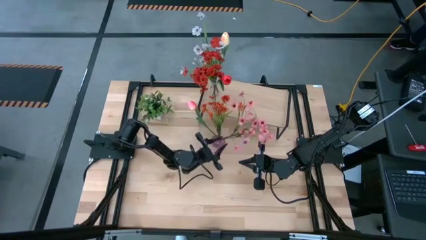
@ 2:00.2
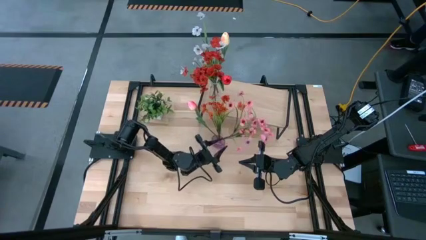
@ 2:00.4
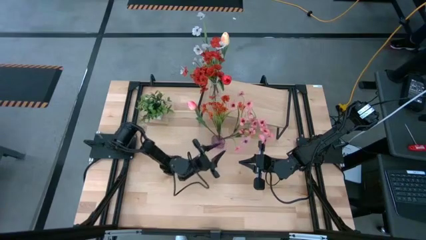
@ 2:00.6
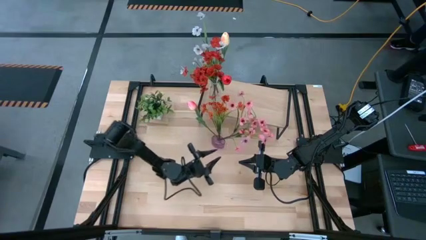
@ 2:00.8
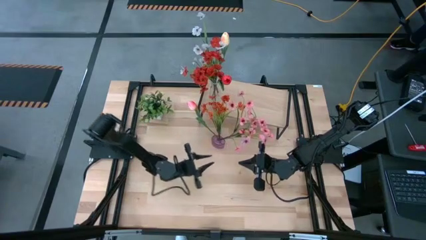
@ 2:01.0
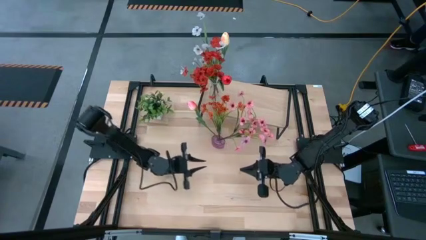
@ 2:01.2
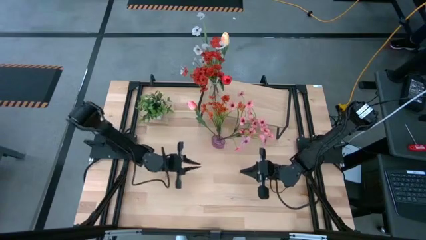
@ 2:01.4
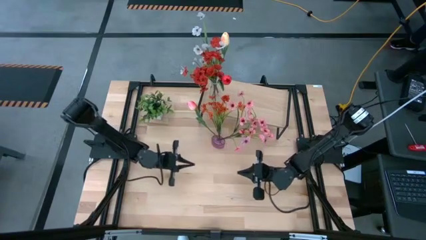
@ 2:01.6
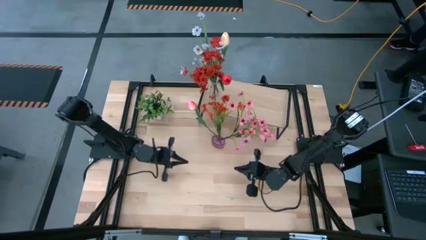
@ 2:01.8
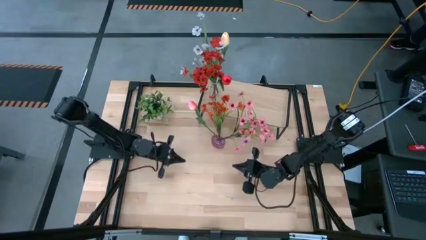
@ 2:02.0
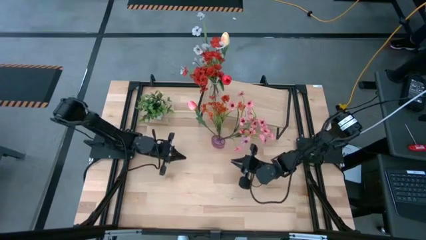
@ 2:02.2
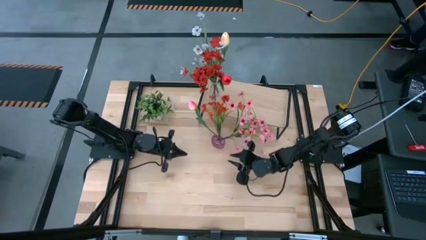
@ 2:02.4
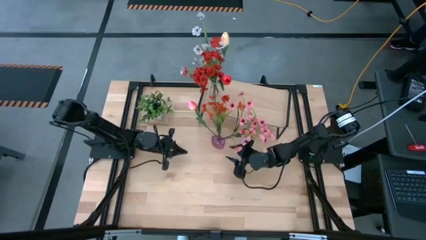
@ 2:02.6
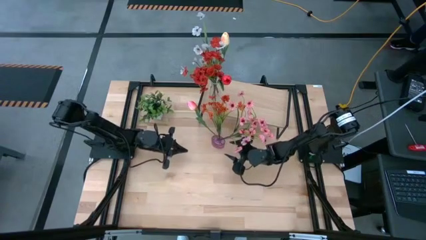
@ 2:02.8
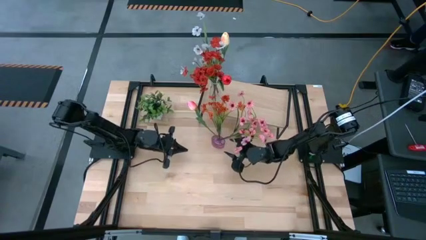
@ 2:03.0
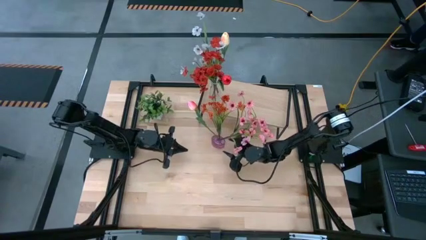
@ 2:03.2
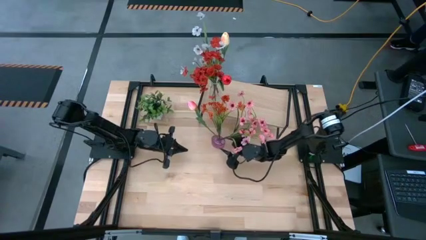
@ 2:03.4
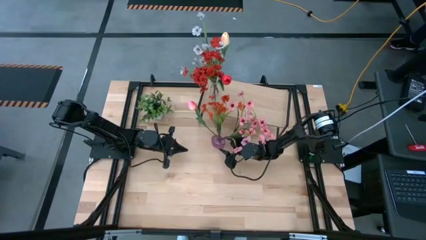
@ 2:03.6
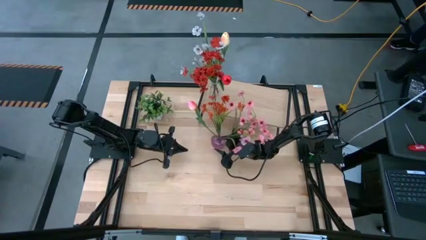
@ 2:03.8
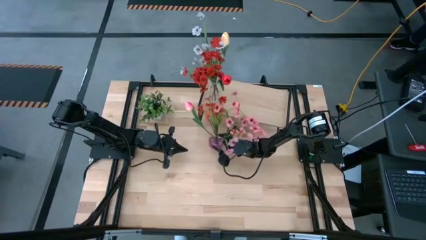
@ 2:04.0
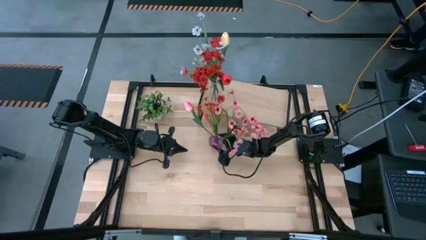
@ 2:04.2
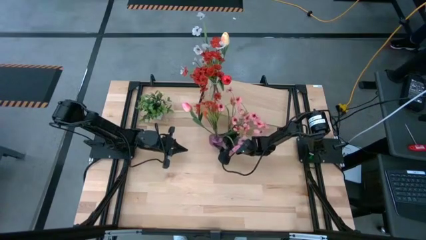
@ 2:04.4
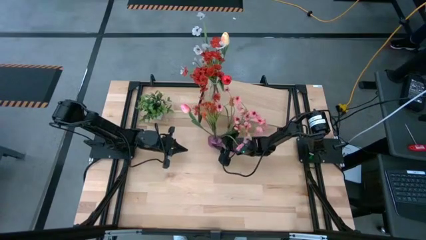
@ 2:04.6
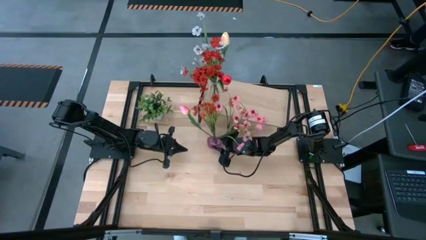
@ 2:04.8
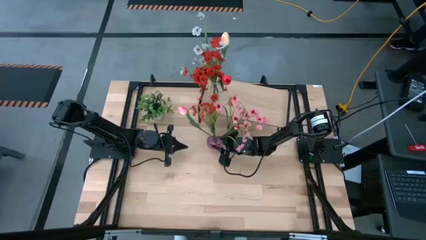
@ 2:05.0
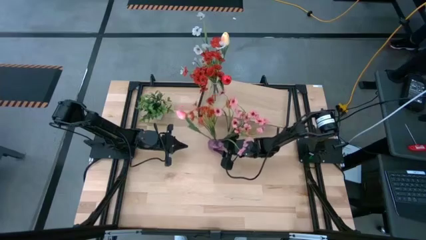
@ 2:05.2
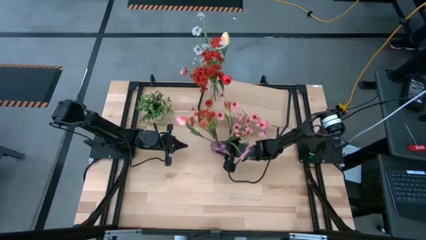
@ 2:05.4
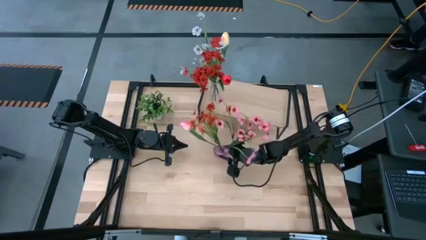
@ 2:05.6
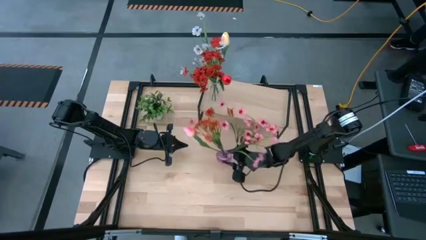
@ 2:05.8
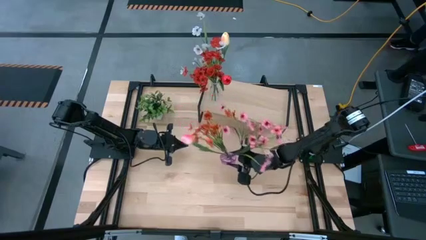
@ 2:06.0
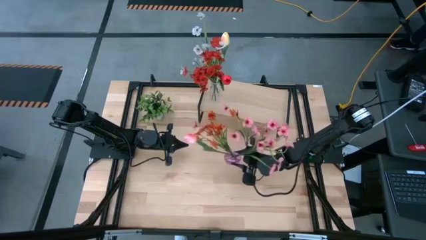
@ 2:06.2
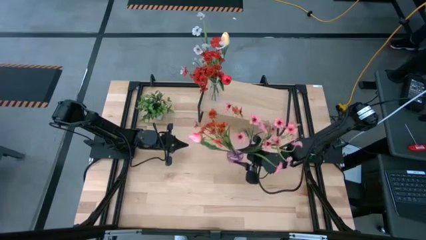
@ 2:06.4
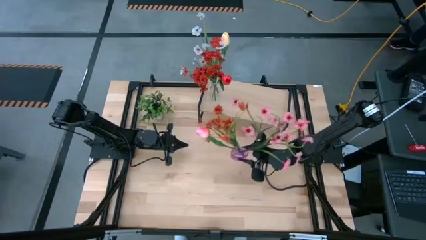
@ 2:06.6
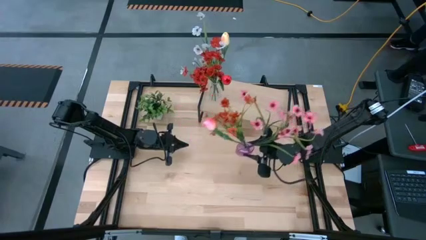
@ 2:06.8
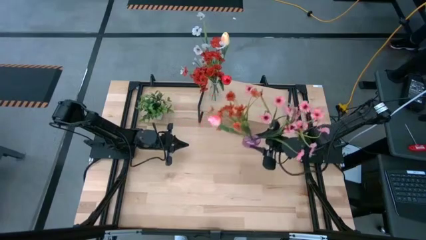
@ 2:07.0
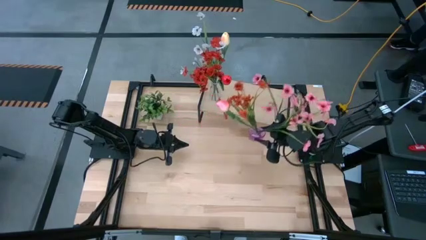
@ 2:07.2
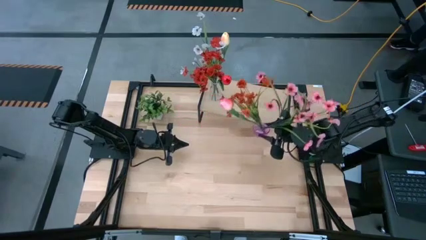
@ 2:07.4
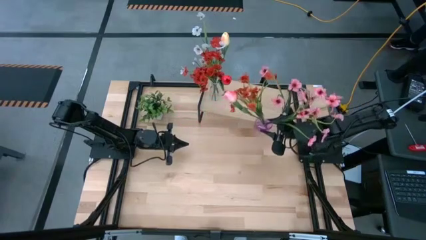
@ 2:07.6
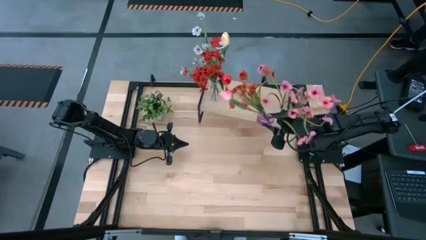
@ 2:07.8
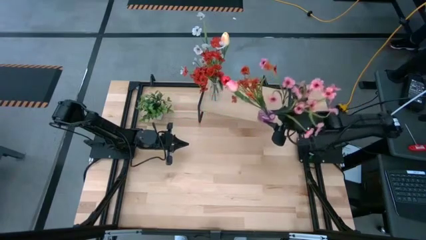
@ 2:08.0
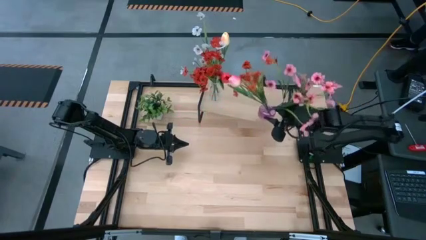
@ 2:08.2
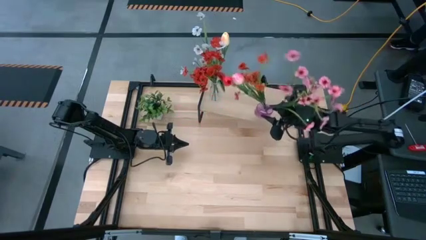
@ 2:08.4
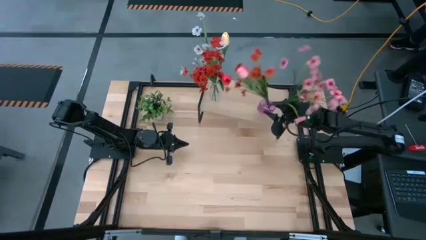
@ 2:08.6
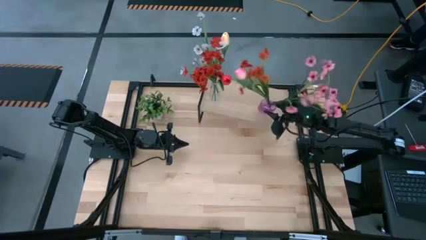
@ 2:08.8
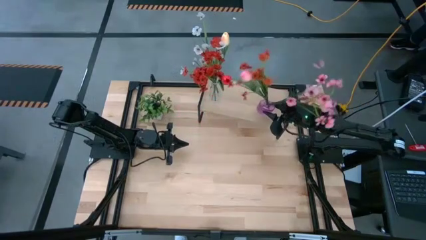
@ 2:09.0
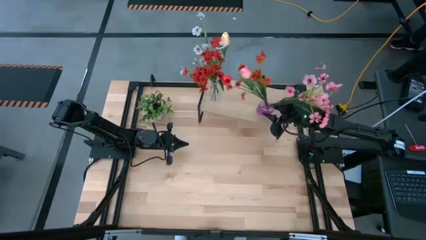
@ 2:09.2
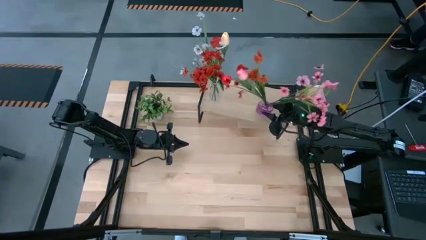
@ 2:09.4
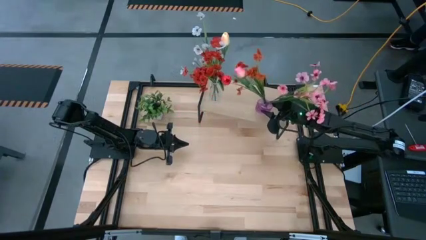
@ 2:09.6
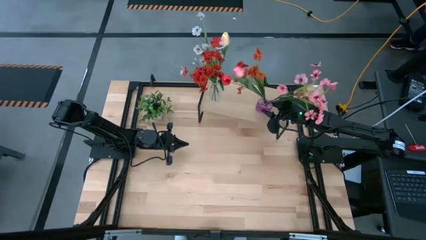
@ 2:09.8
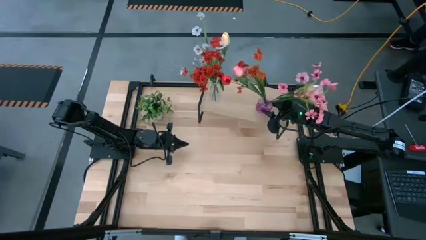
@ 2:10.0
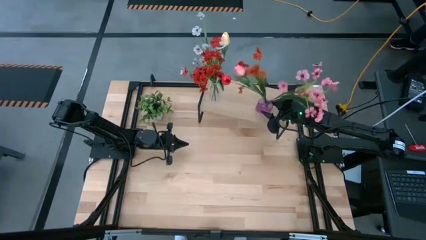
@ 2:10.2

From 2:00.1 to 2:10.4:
Task: Pick and place flowers into a vace then onto a shelf
Put the purple vase with the flowers on the shelf

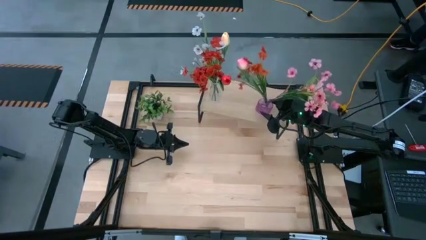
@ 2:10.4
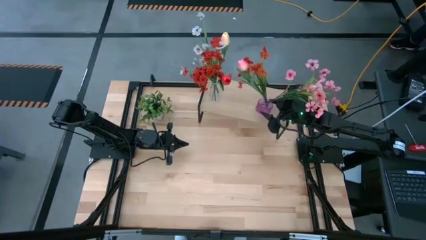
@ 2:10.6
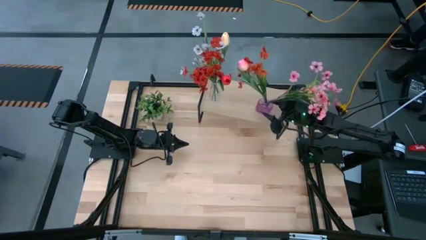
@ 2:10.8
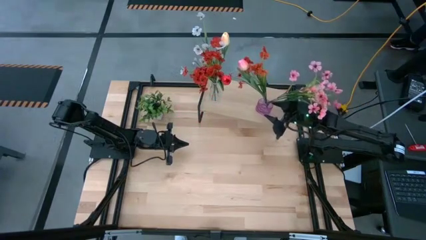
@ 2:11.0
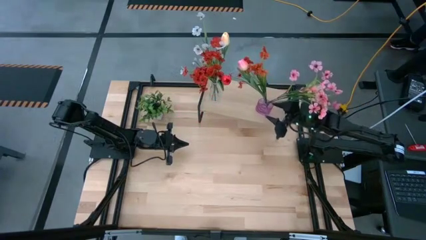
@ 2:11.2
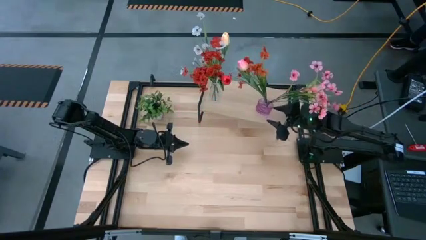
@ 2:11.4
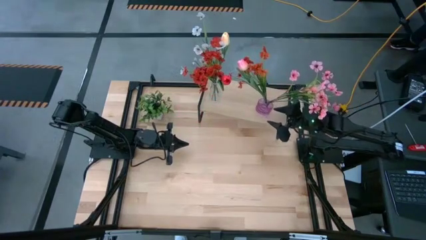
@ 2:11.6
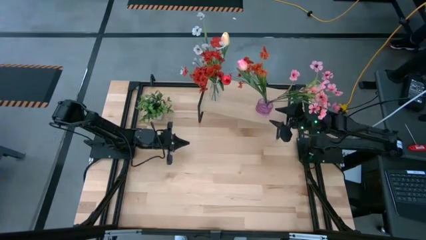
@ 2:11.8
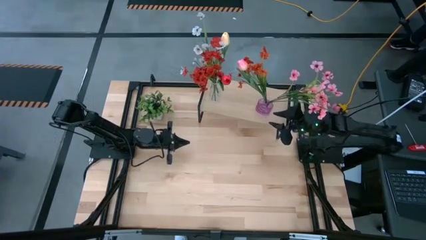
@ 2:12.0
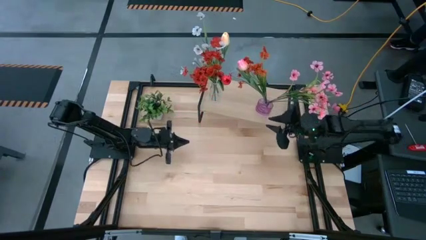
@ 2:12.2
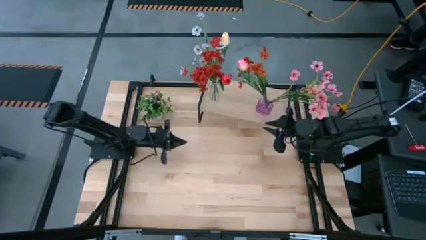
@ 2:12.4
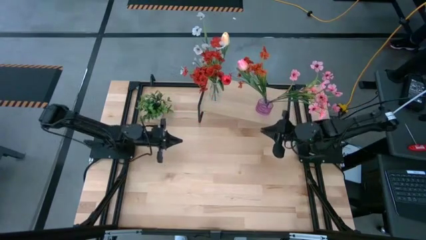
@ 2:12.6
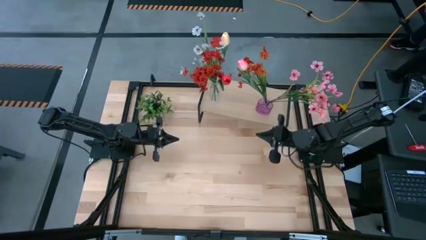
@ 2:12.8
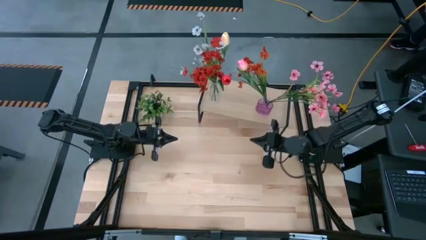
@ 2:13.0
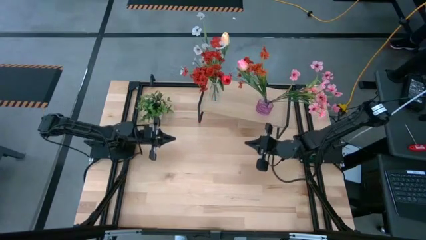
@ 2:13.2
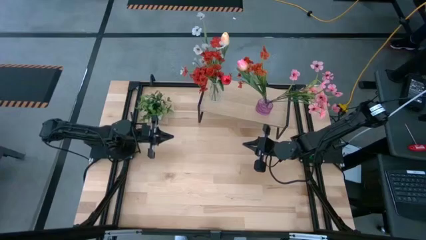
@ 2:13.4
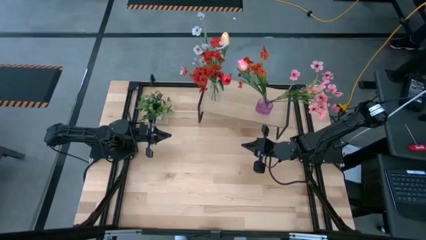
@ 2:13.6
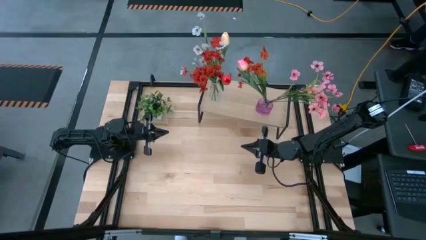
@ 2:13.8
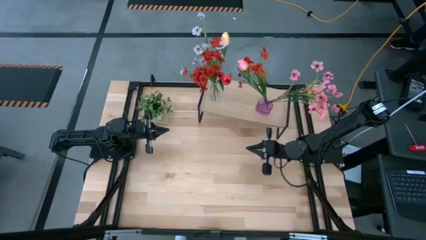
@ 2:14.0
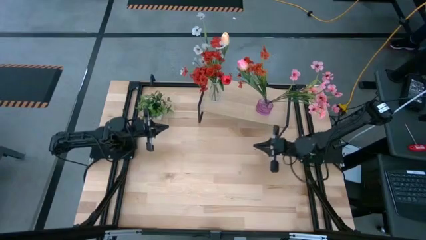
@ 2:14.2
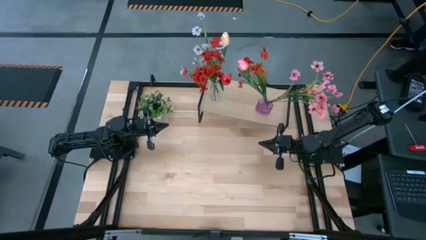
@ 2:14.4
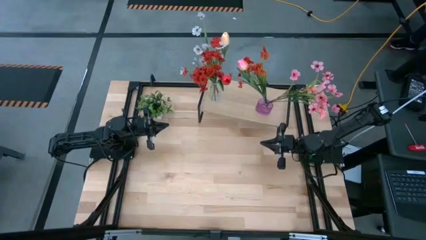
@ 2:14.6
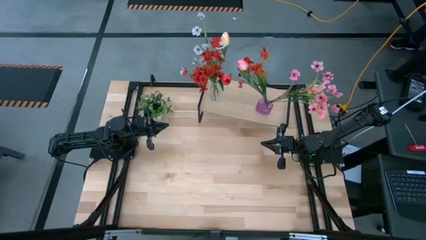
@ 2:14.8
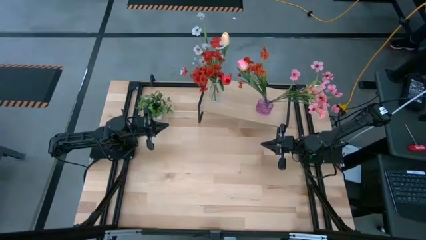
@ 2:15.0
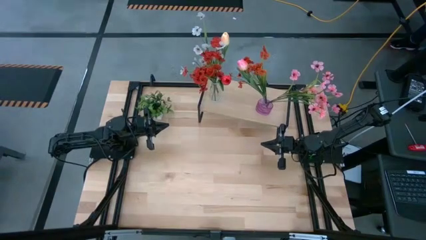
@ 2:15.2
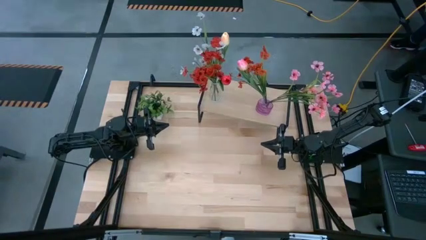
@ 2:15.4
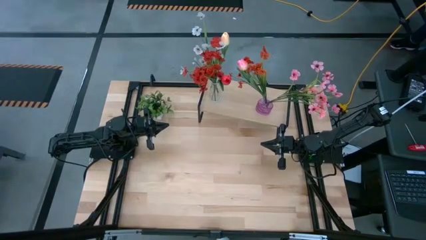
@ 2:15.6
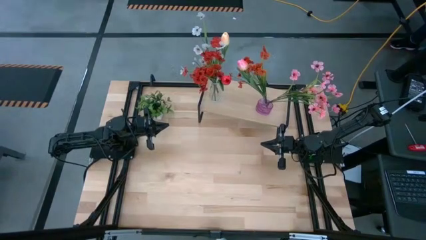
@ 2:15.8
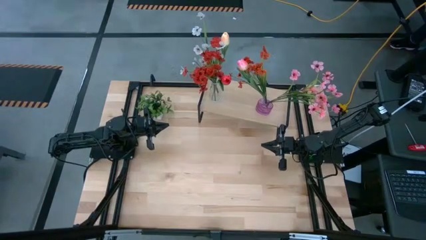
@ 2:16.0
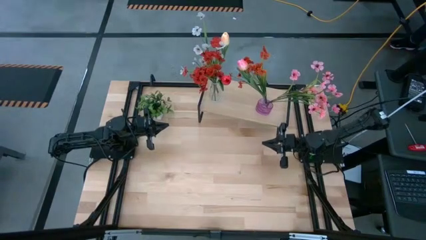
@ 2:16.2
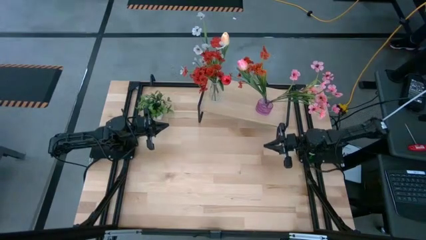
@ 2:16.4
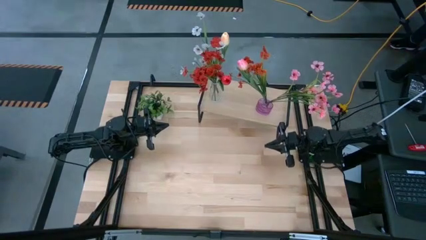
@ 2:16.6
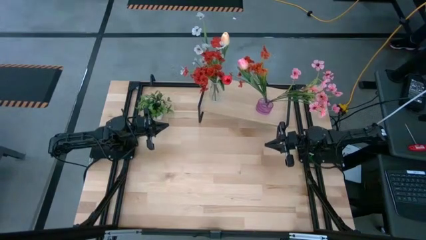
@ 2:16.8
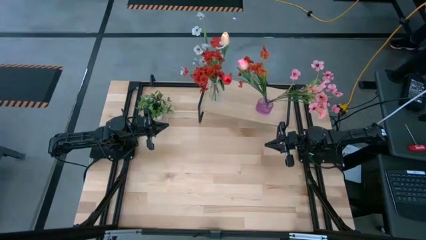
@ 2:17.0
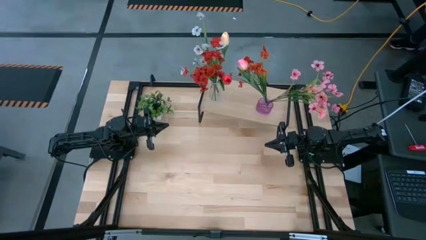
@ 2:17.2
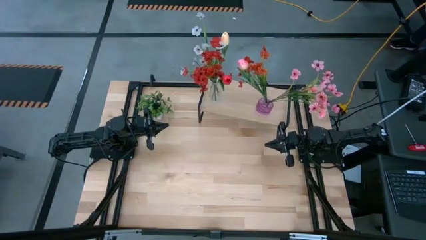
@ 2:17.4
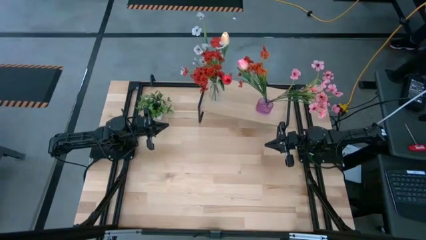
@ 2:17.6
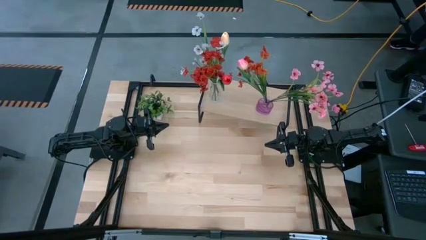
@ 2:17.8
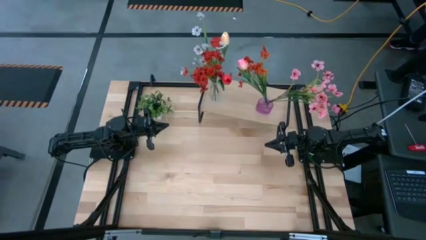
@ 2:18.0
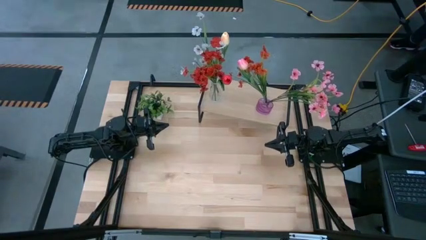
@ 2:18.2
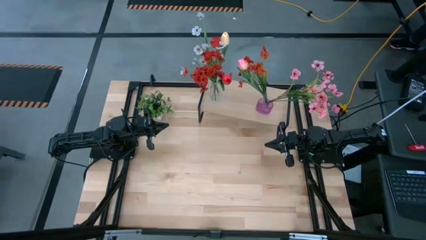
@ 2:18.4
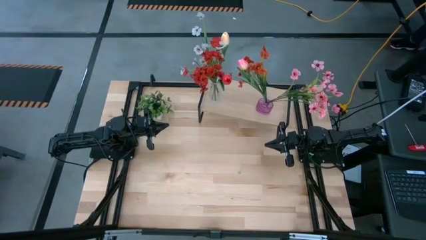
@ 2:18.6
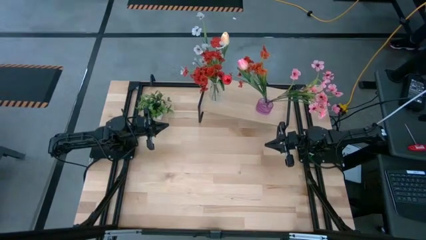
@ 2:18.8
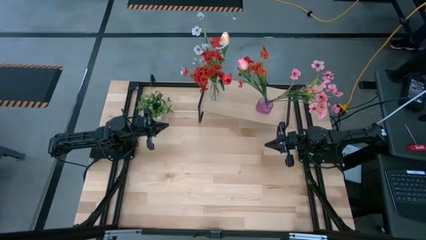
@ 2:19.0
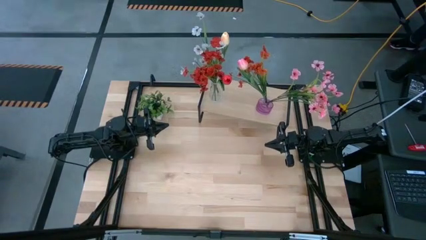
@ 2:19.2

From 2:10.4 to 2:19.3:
Return to Home Position
